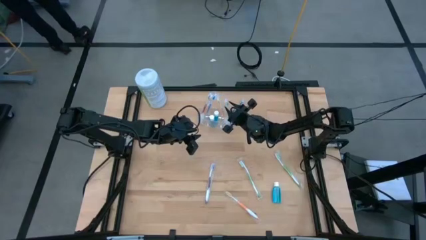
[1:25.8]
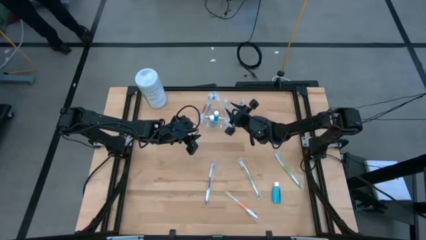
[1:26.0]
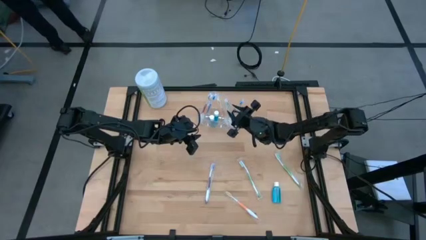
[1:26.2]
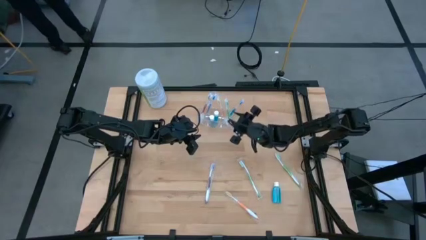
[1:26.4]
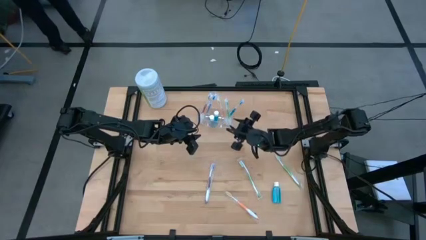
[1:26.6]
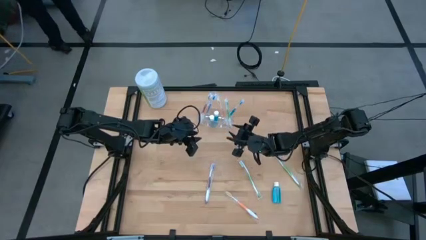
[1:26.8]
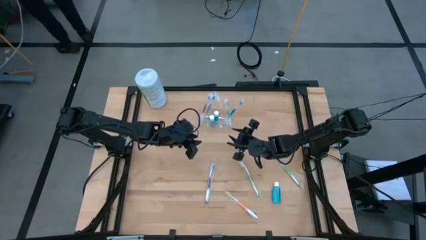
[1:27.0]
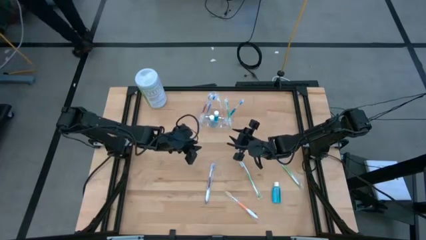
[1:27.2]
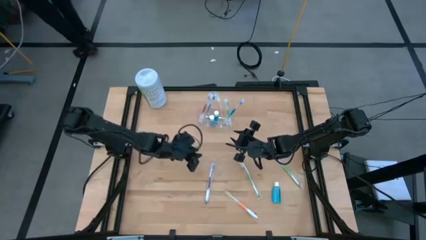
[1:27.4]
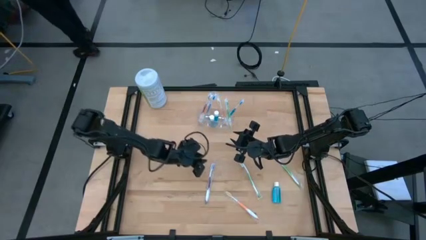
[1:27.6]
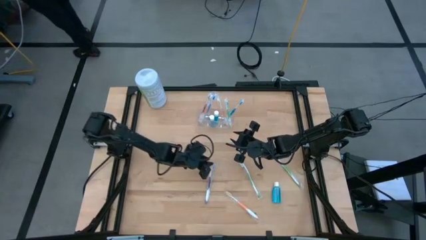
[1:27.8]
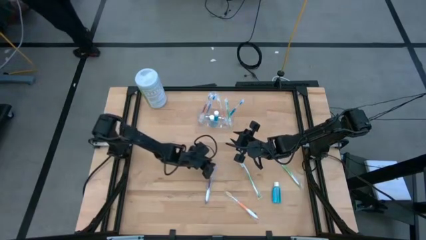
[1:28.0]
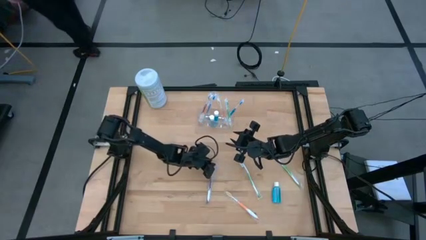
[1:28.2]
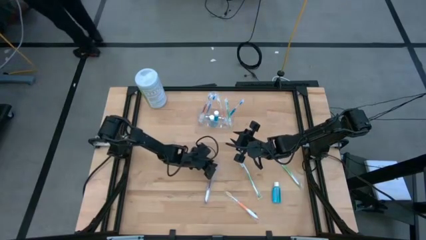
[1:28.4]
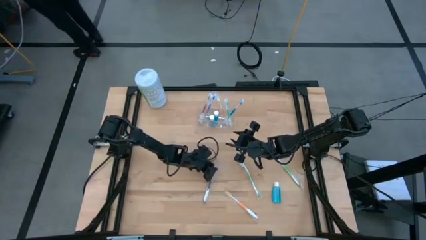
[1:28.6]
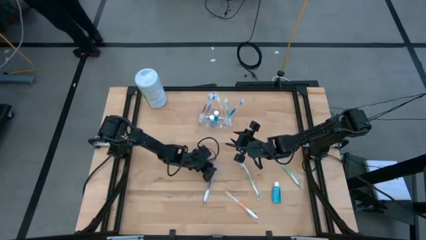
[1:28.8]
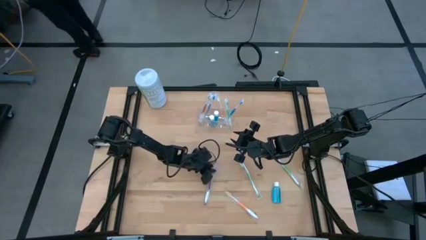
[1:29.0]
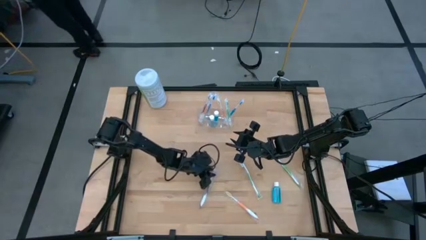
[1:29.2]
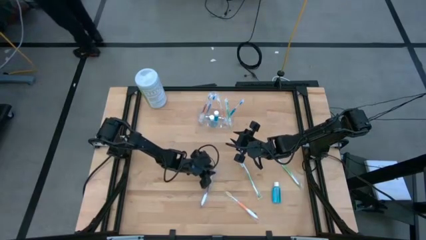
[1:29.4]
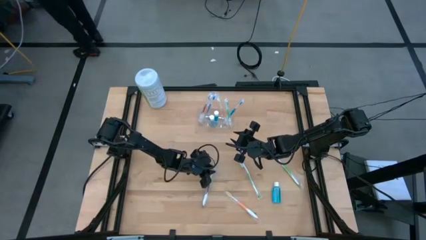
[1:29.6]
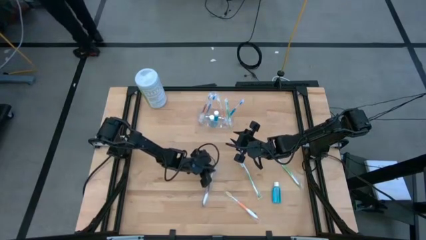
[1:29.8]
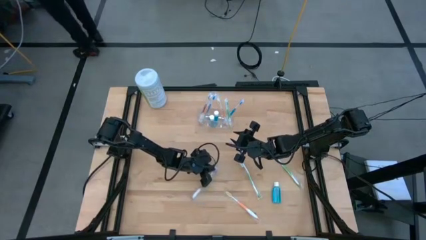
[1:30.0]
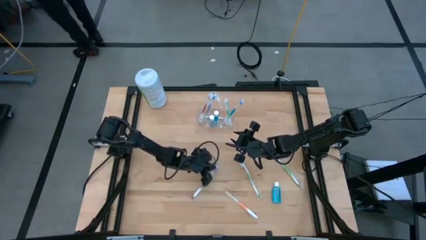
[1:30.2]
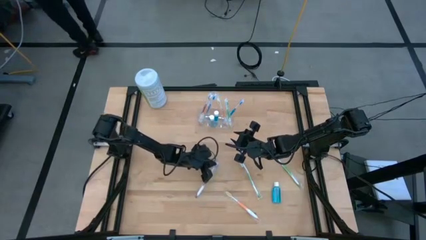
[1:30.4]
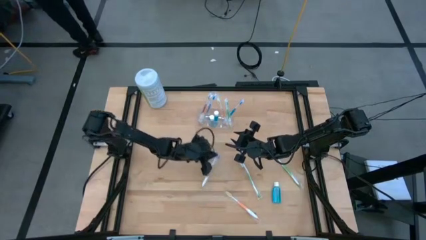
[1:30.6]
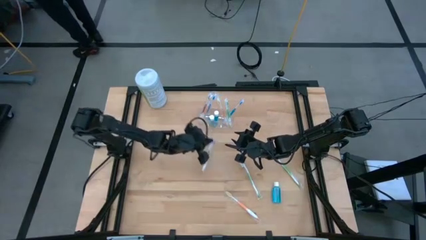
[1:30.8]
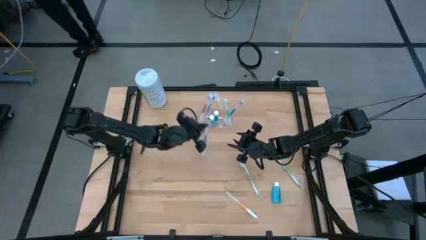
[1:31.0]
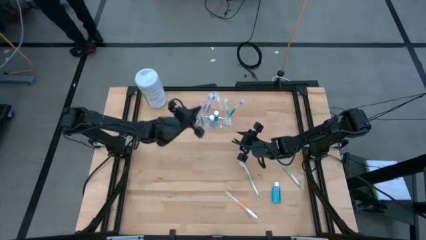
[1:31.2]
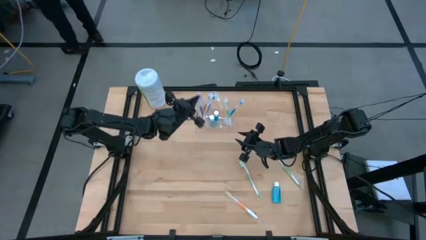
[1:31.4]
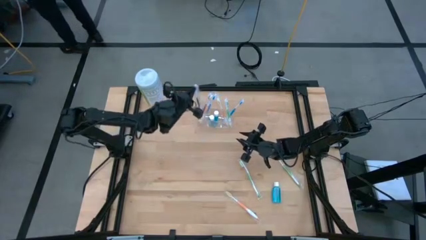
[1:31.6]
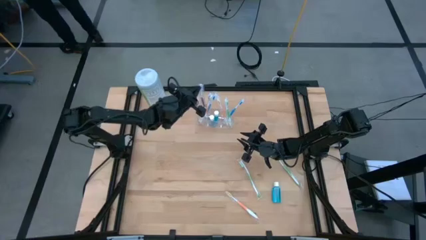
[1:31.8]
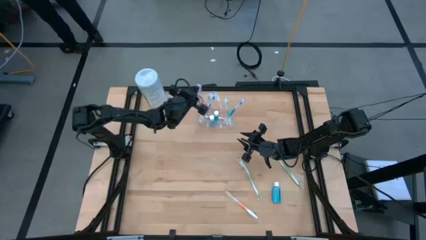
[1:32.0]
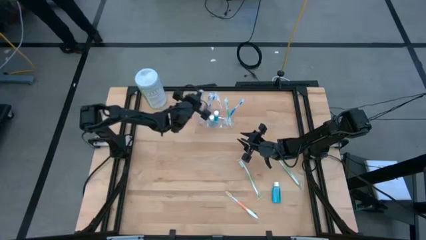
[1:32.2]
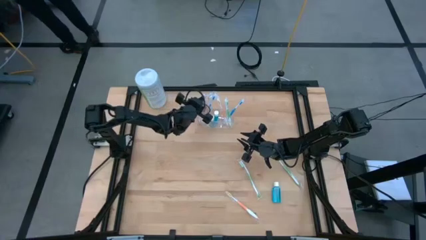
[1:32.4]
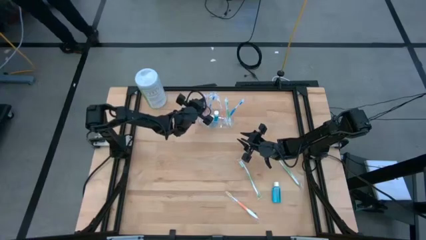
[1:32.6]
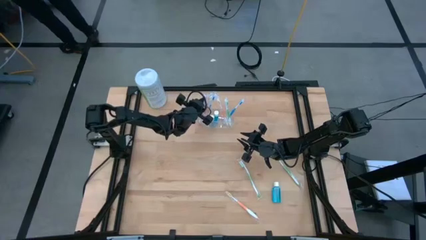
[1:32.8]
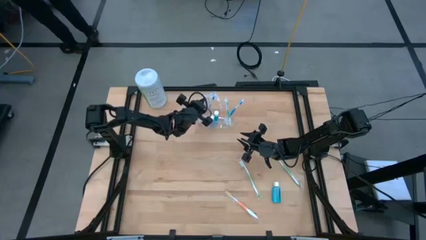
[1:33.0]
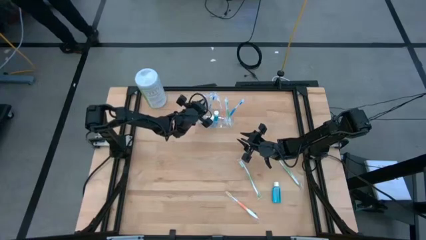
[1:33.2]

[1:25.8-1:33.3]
Task: Pick & Place toothbrushing station
Put the purple toothbrush into the transparent organizer

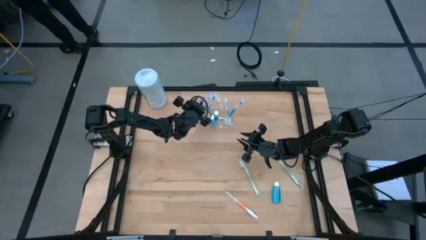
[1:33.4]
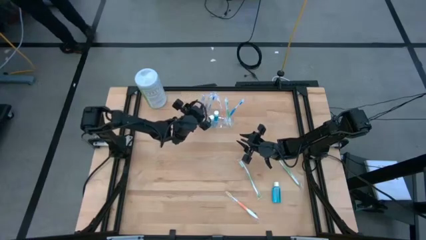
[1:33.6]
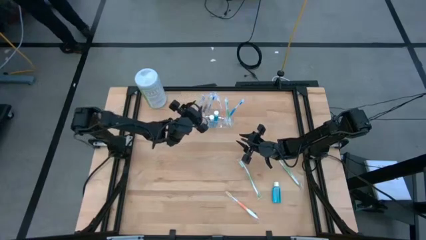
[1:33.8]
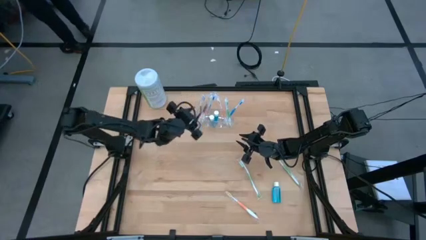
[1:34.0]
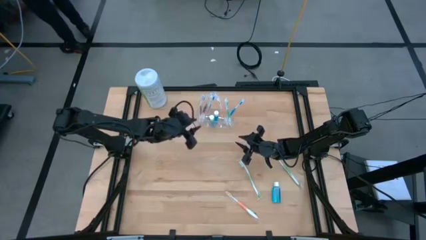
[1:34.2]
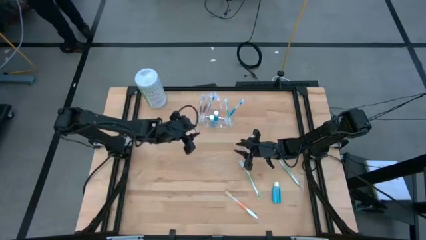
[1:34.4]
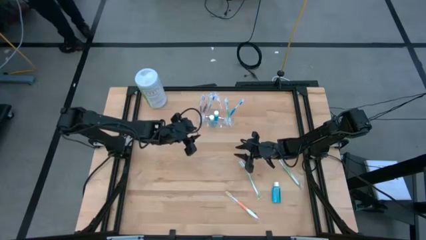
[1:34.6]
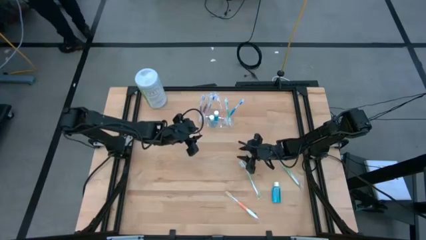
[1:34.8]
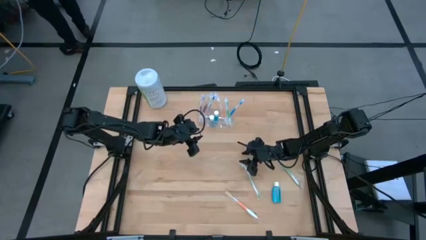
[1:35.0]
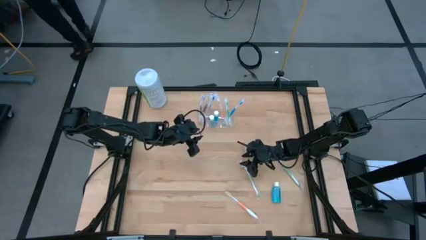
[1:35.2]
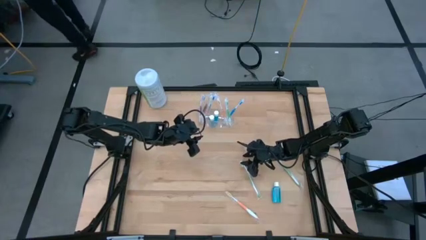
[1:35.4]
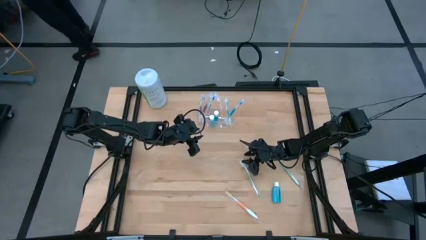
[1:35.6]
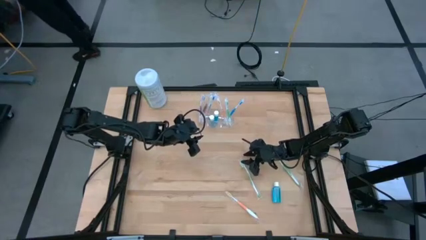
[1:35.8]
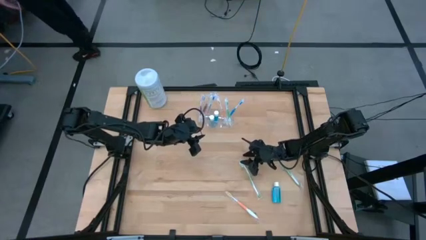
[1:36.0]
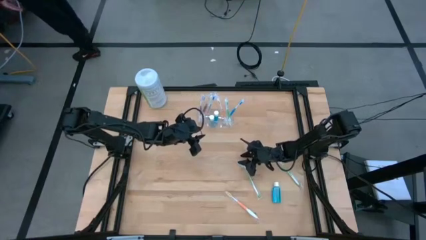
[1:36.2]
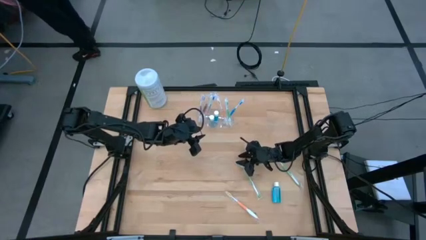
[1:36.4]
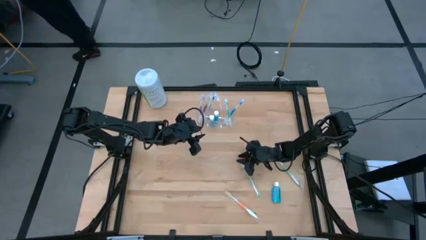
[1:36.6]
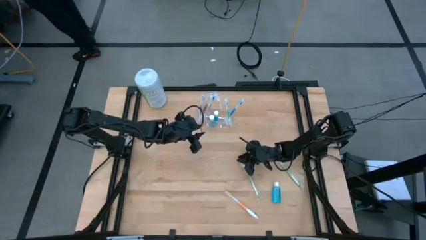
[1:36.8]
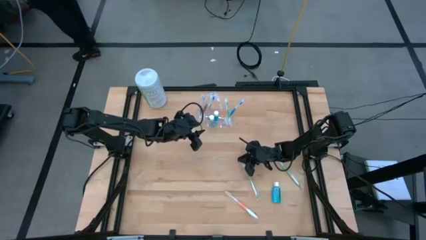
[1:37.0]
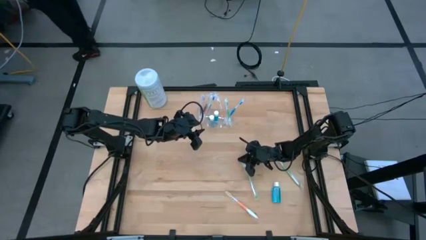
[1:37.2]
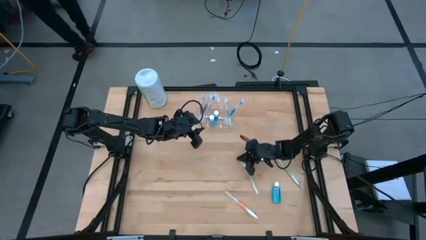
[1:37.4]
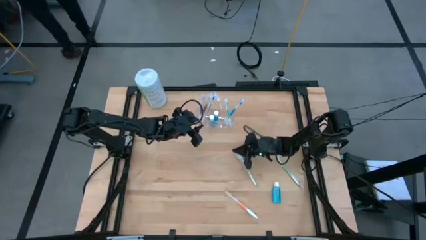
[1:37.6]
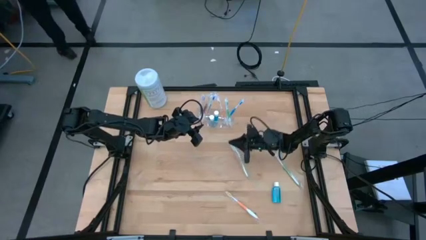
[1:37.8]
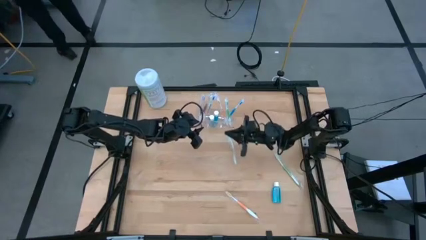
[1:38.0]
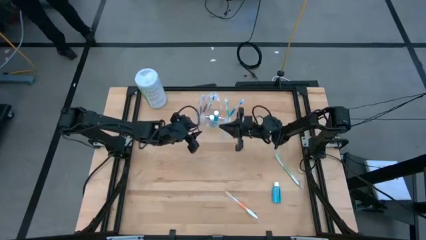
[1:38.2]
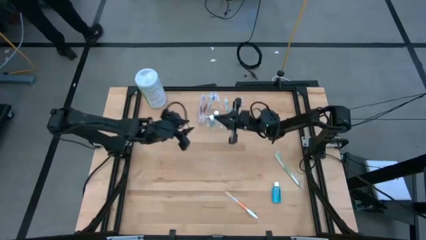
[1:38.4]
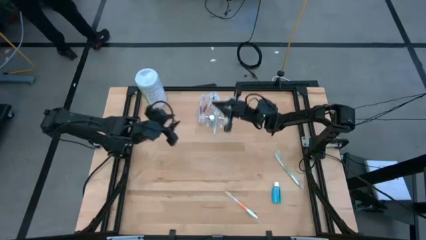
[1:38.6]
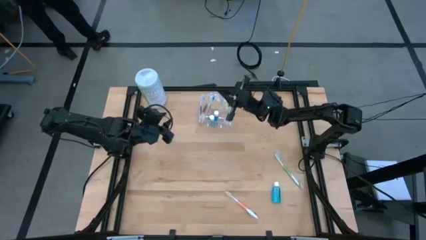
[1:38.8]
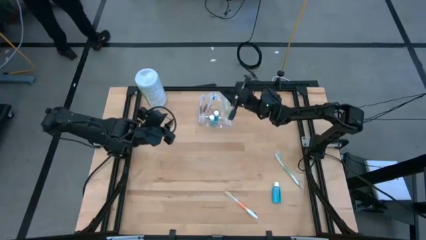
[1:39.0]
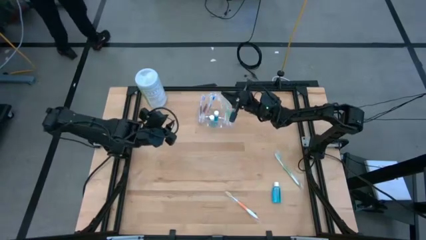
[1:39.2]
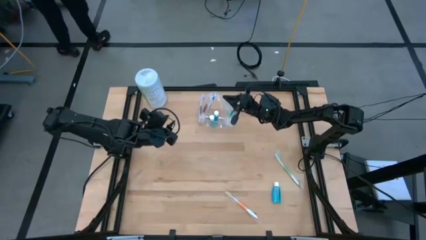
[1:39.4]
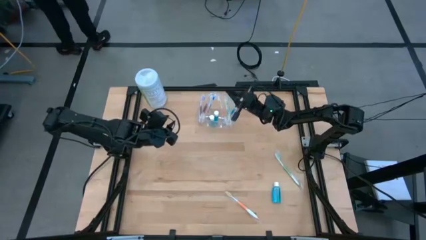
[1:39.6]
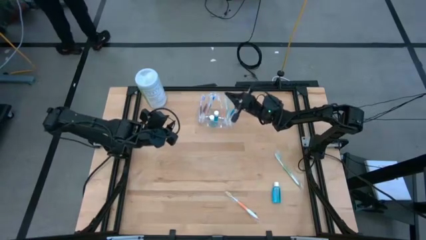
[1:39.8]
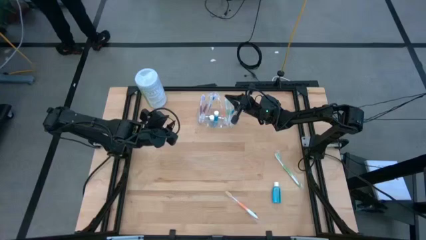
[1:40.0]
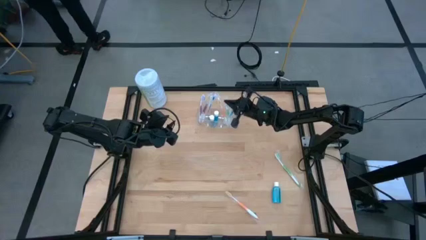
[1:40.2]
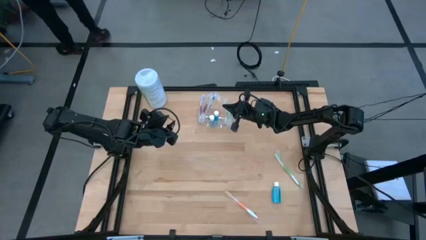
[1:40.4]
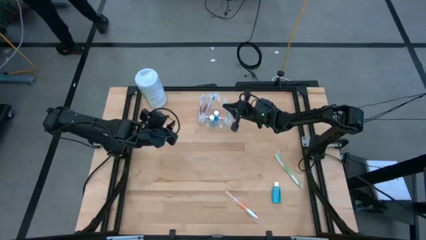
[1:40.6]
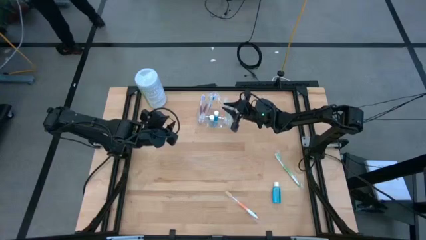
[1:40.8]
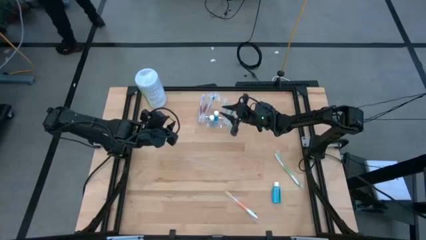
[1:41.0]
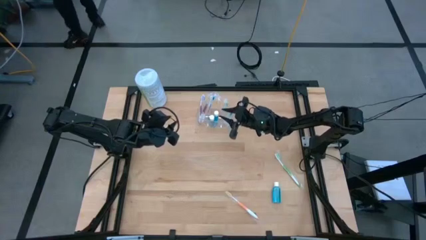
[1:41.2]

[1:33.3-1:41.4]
Put the left green toothbrush into the transparent organizer

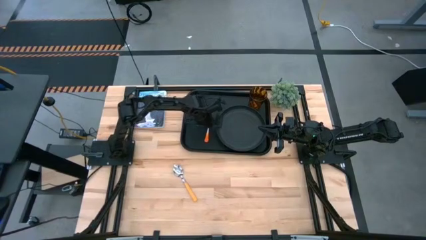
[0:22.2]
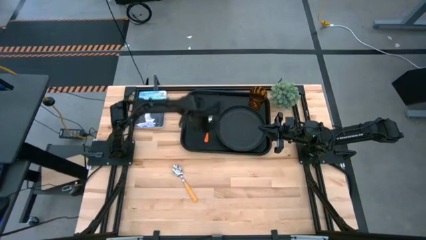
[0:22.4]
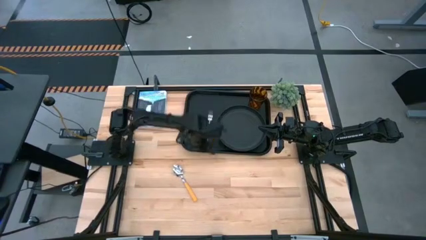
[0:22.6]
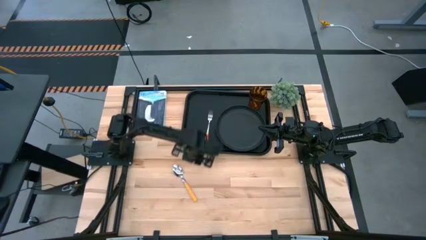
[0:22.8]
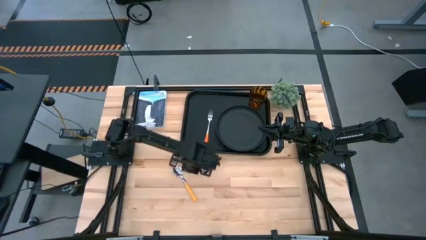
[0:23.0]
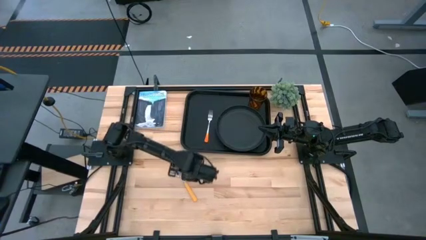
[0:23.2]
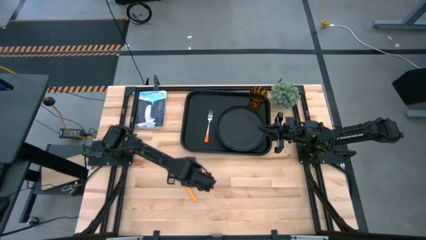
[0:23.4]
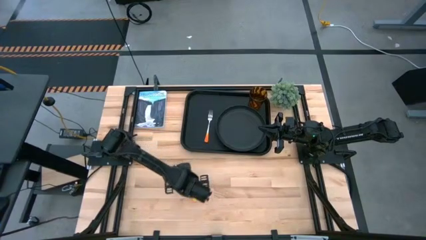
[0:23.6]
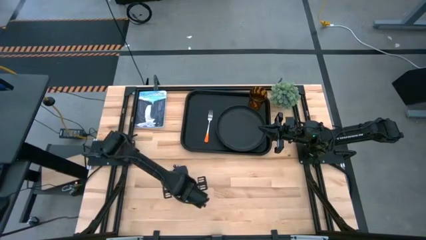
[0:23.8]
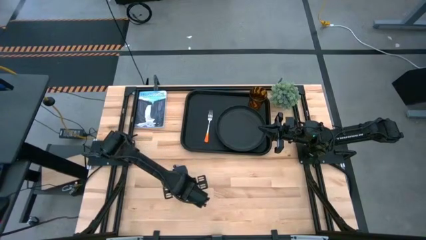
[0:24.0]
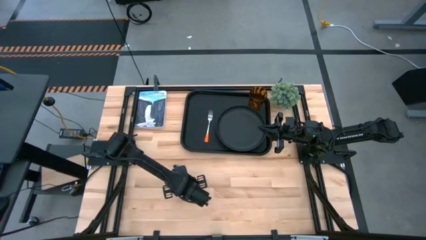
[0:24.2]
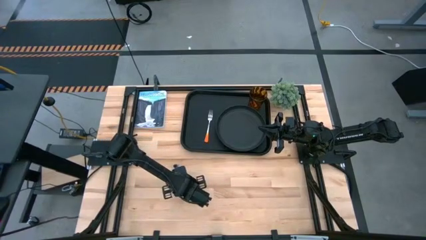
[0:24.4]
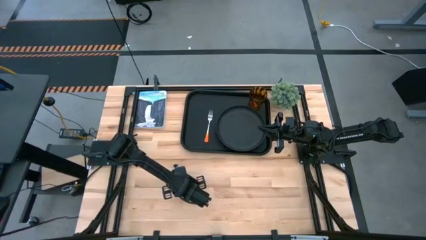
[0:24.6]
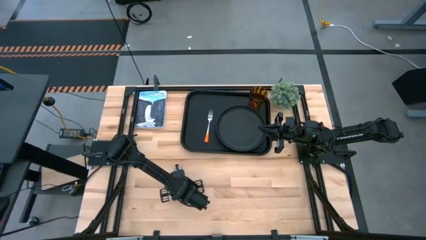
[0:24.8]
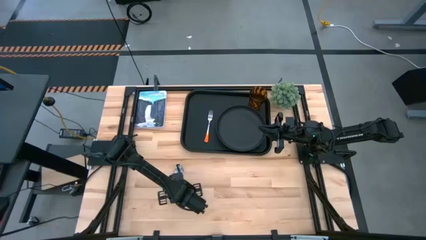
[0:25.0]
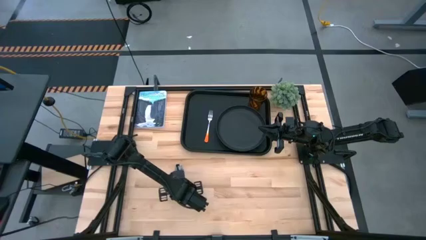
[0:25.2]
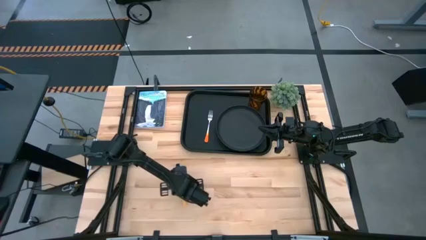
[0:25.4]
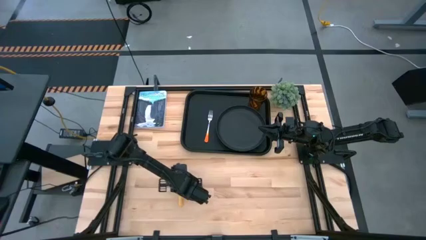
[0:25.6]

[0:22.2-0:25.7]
Task: Pick and place plate/cup/fork/spoon on tray
Put the yellow spoon on the black tray to the left of the orange fork
